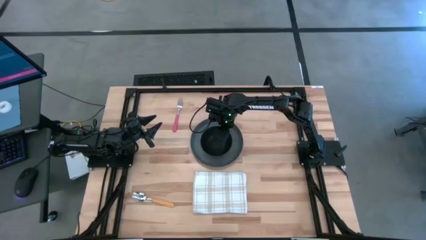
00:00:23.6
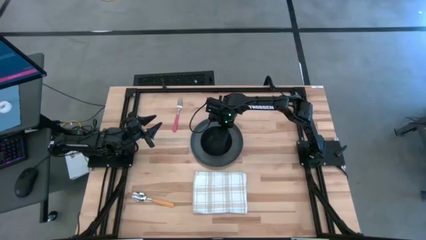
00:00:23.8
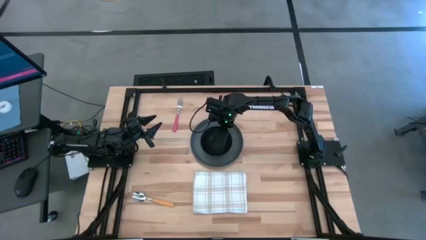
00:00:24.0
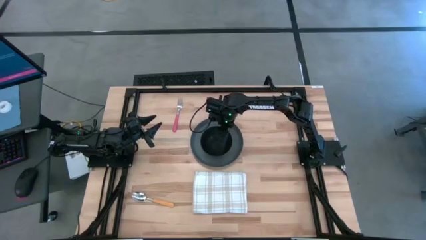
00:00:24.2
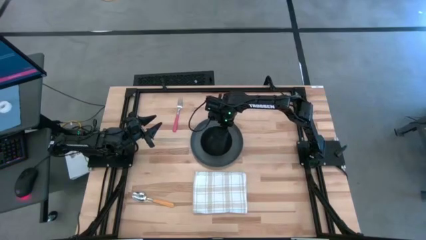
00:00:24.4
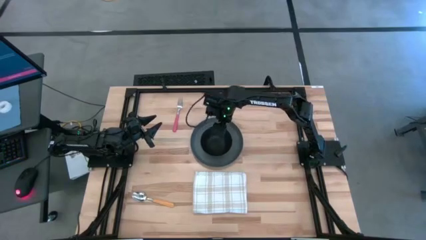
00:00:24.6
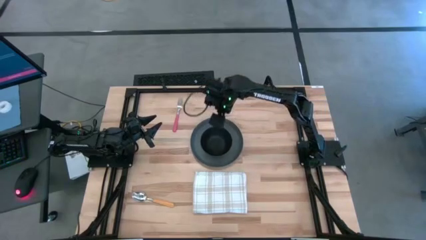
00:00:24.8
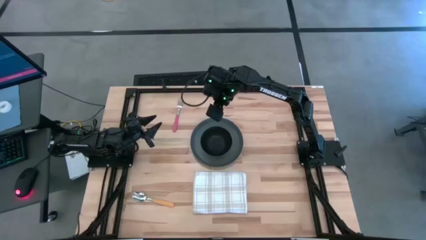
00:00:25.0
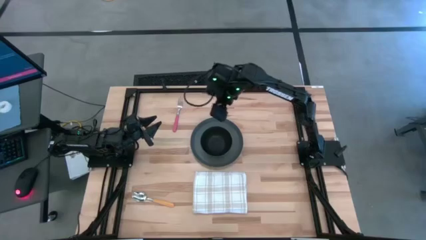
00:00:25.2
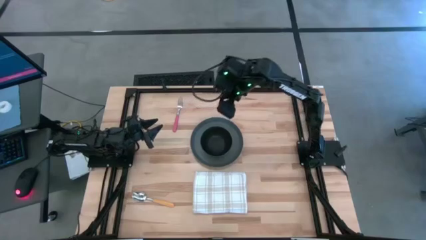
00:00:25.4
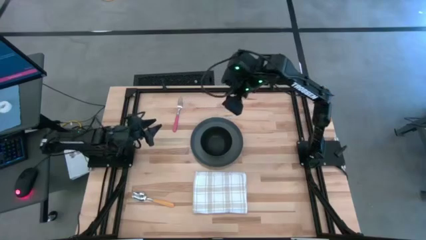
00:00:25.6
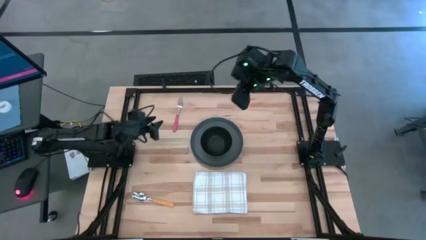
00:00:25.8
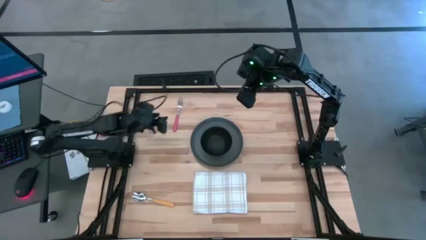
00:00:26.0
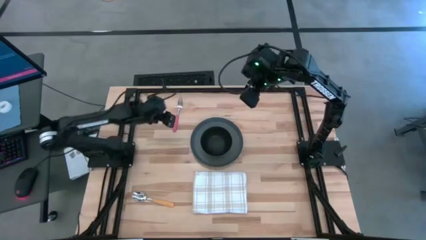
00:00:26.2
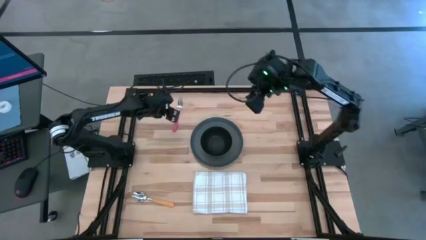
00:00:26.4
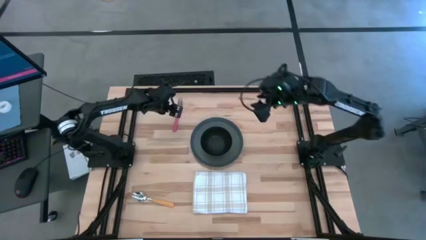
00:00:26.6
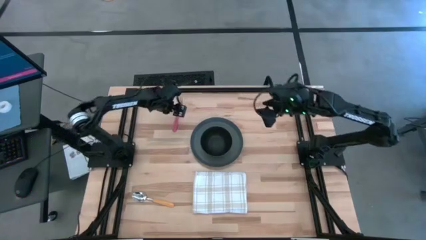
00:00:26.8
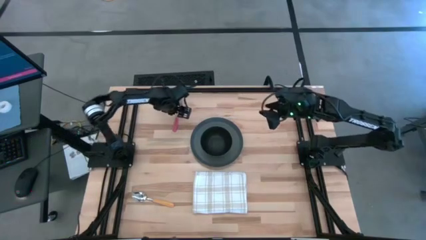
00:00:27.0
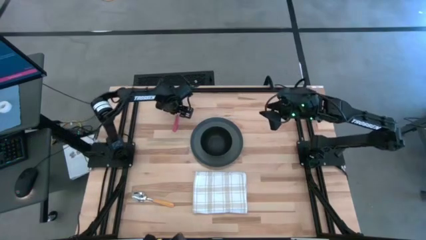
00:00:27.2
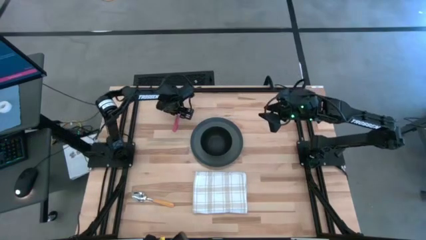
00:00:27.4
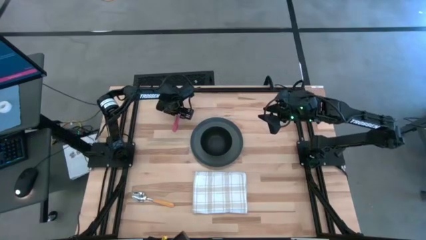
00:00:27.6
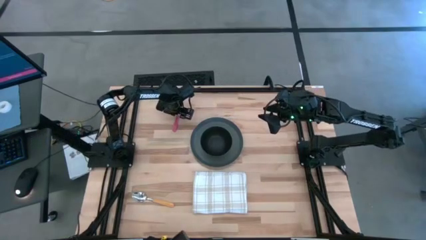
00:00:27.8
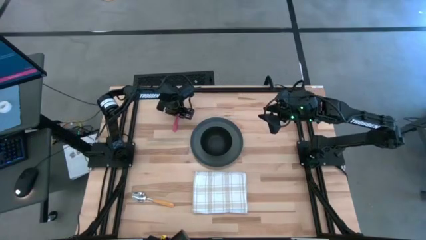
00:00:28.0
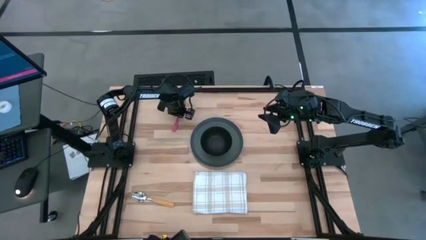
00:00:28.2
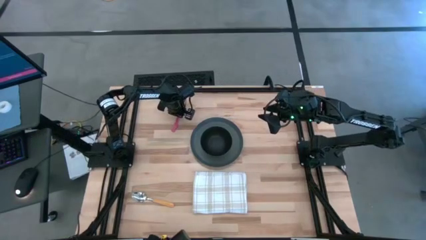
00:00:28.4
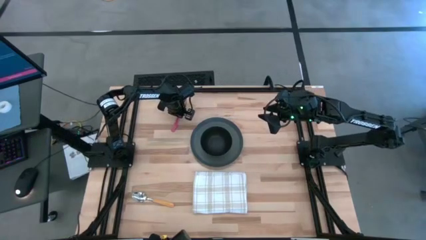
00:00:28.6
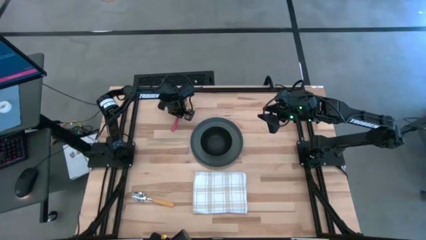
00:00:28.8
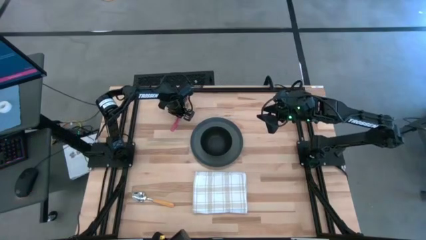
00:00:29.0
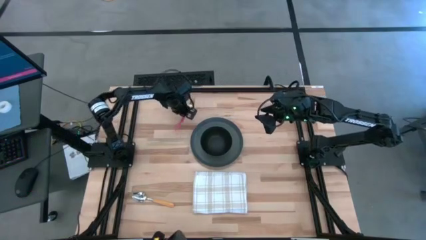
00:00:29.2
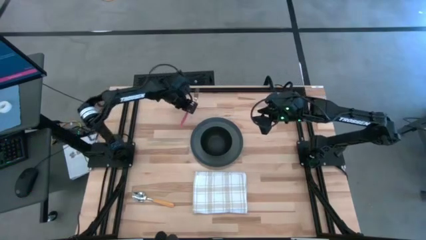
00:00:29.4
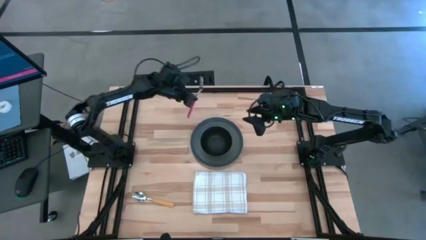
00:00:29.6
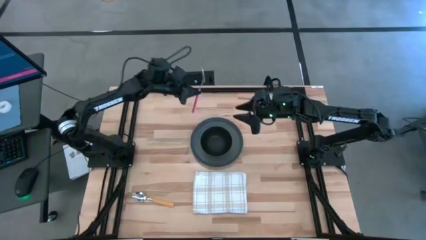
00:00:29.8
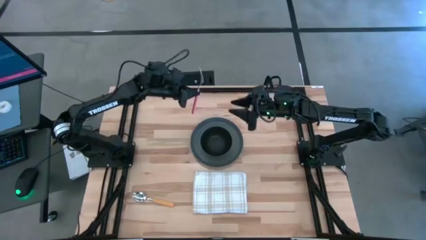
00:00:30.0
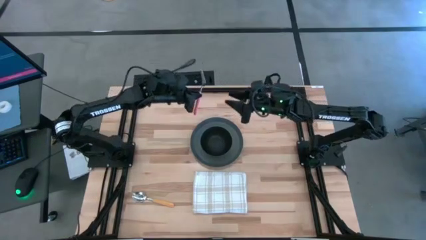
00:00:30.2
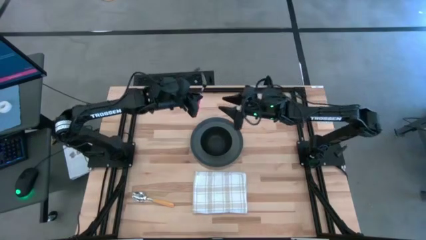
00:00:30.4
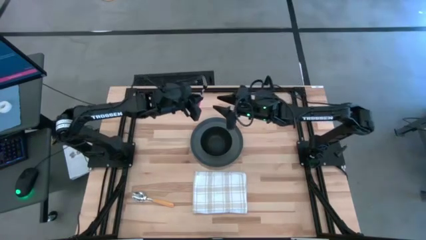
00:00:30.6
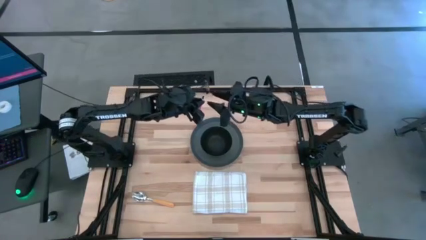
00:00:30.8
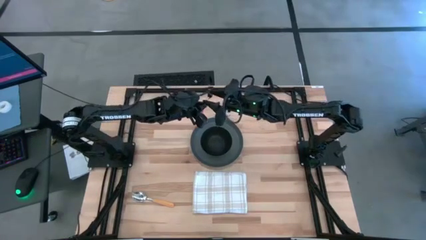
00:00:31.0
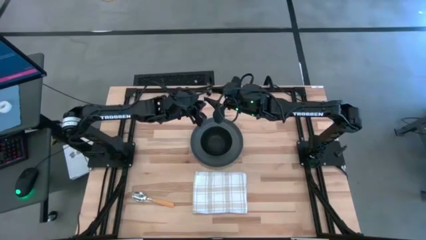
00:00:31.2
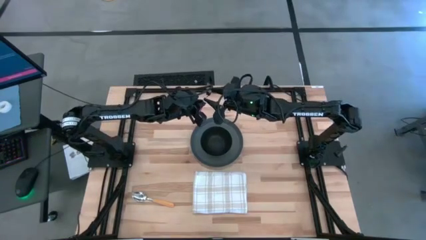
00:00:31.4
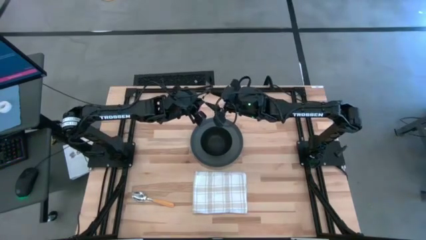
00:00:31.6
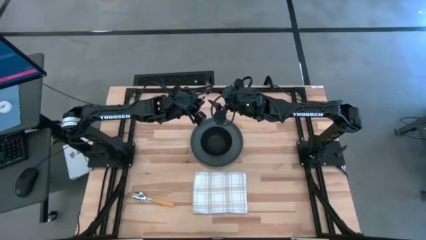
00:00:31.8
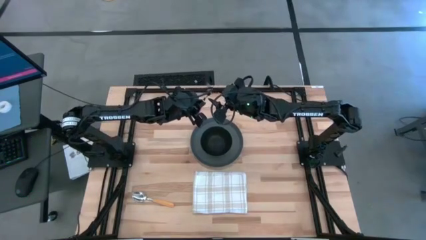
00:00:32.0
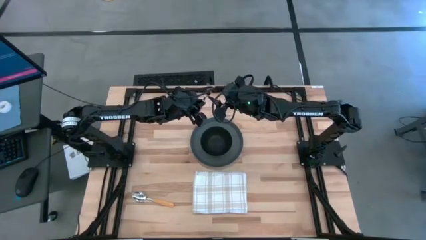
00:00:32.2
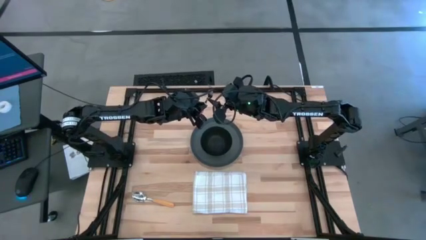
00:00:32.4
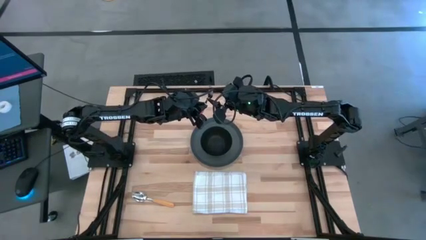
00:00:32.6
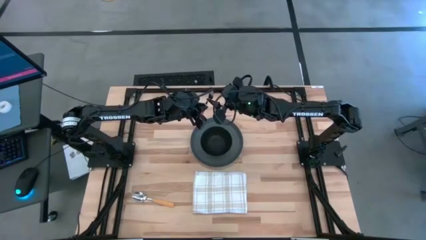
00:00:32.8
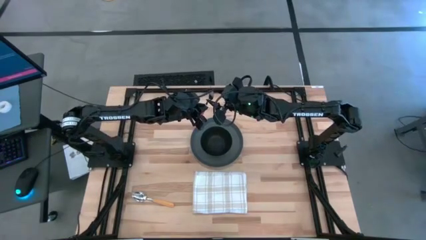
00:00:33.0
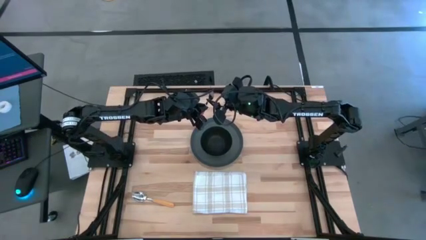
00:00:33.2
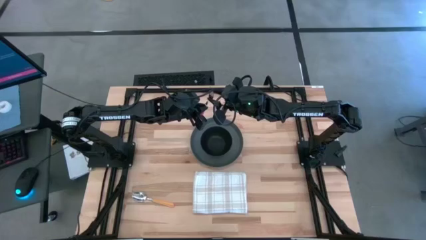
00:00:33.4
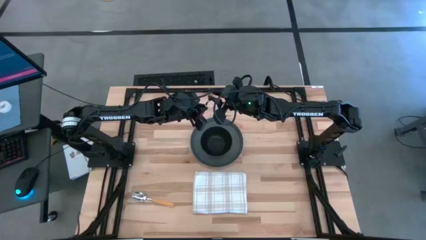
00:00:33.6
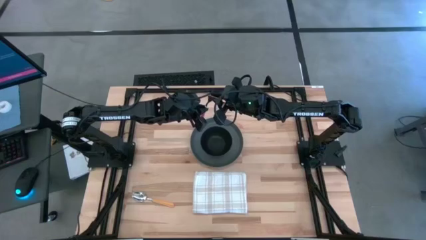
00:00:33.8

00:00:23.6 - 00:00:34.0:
Task: Set table place
Move the red fork to the right of the black plate

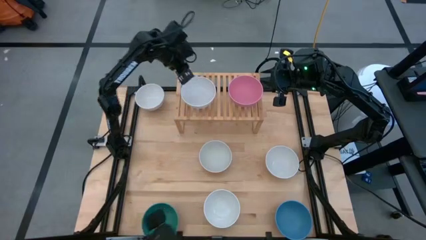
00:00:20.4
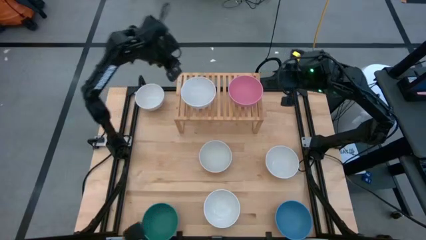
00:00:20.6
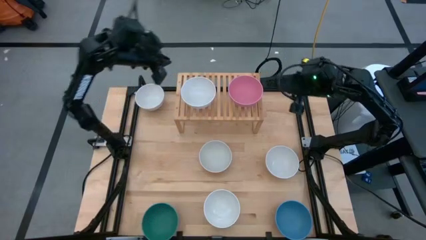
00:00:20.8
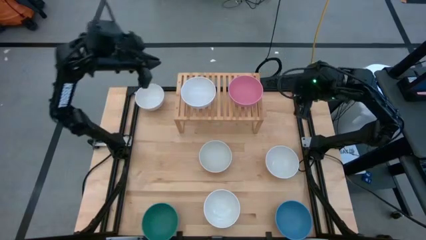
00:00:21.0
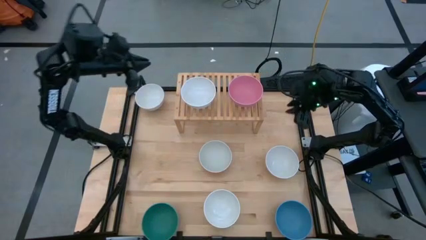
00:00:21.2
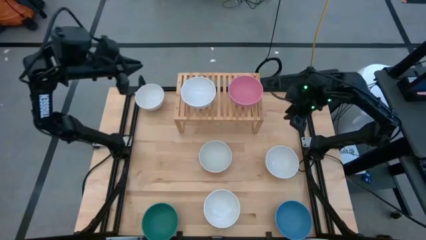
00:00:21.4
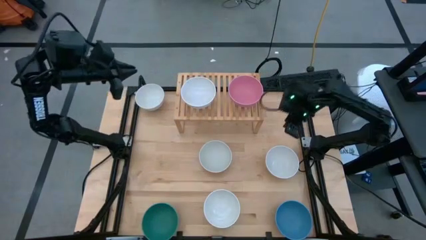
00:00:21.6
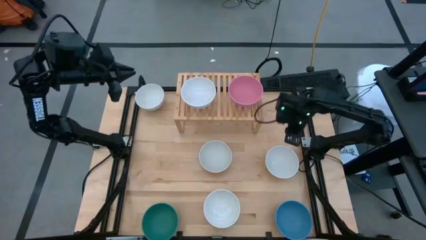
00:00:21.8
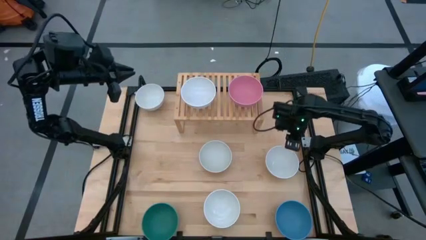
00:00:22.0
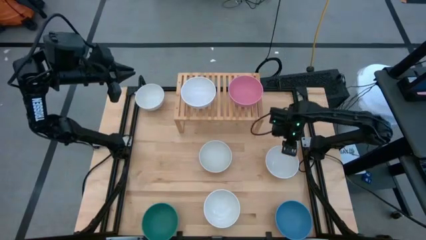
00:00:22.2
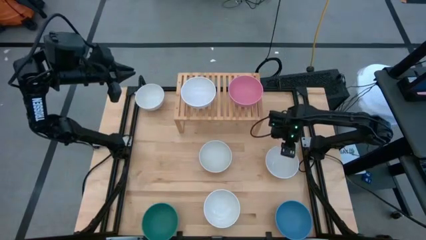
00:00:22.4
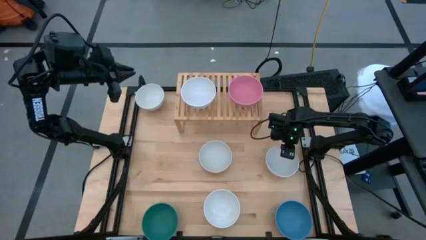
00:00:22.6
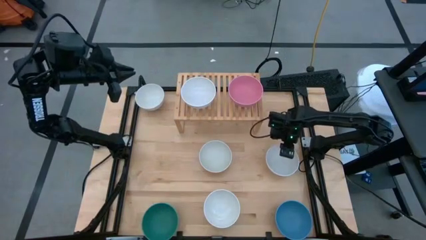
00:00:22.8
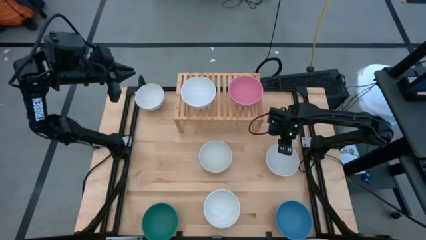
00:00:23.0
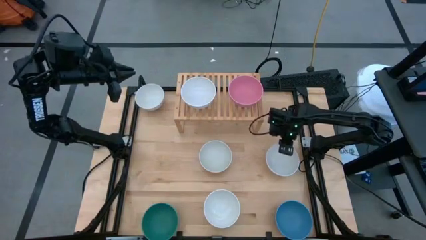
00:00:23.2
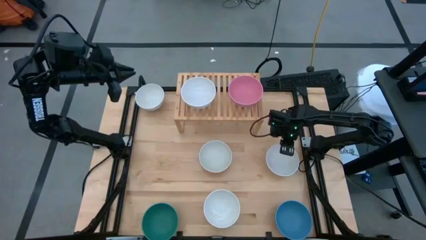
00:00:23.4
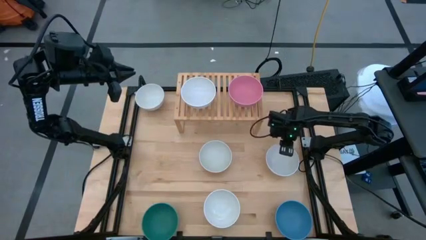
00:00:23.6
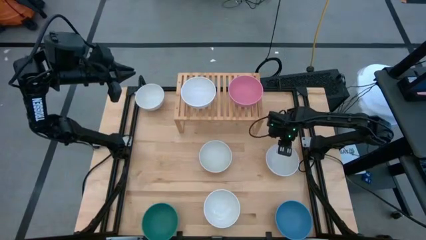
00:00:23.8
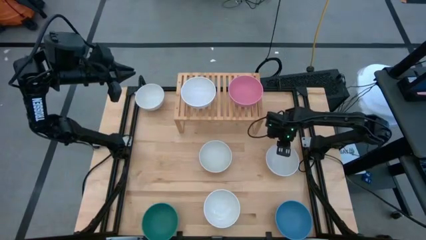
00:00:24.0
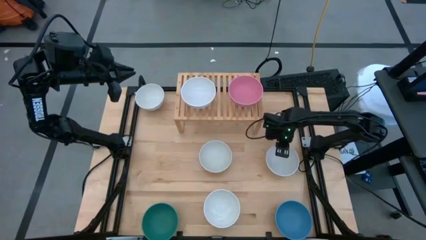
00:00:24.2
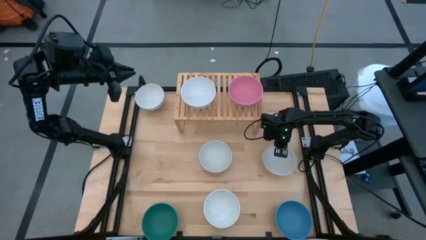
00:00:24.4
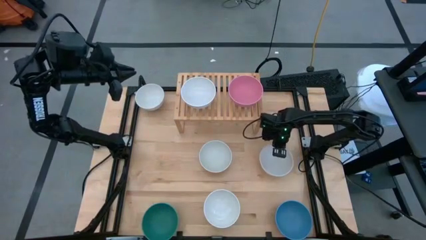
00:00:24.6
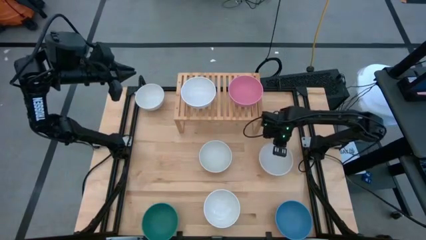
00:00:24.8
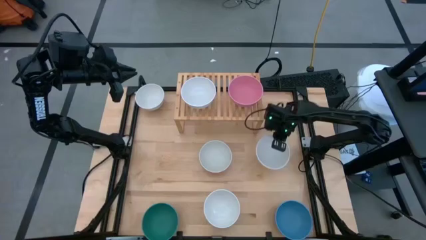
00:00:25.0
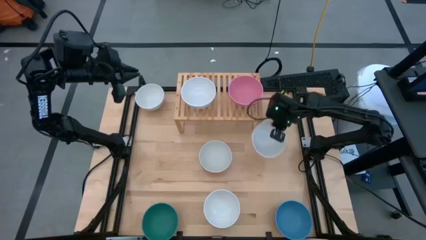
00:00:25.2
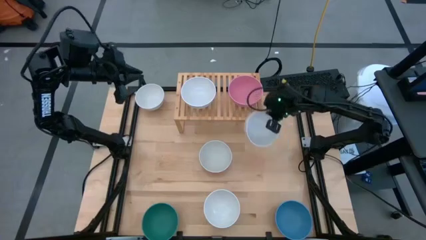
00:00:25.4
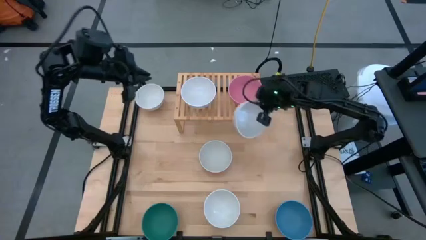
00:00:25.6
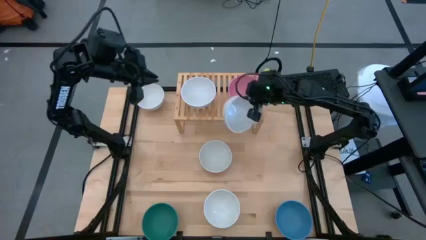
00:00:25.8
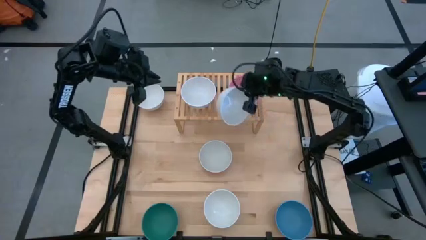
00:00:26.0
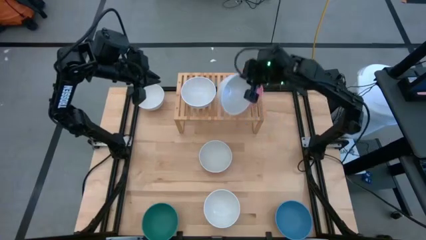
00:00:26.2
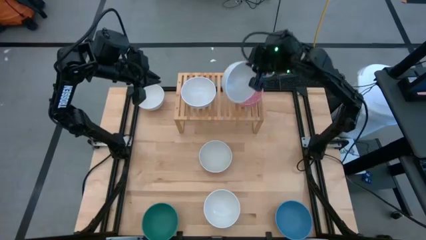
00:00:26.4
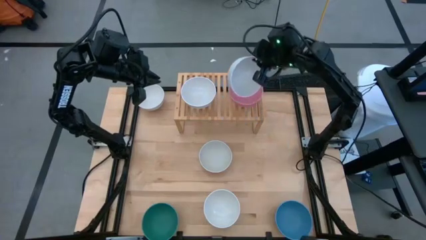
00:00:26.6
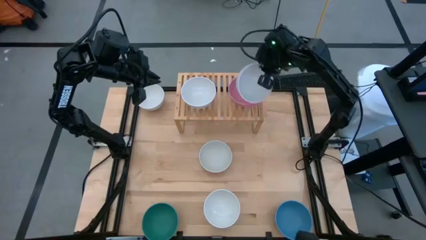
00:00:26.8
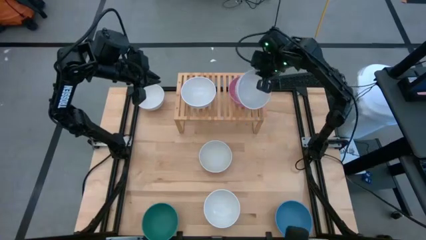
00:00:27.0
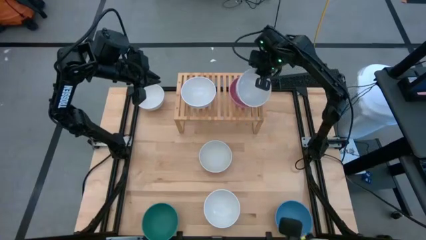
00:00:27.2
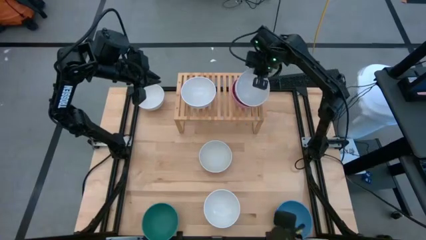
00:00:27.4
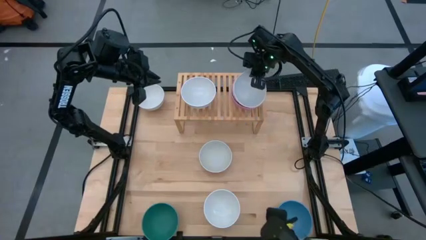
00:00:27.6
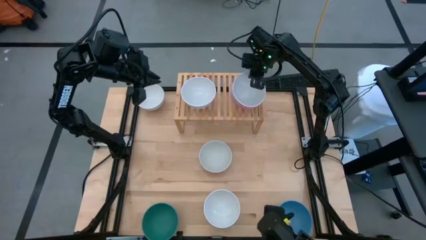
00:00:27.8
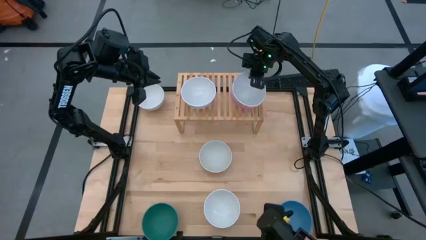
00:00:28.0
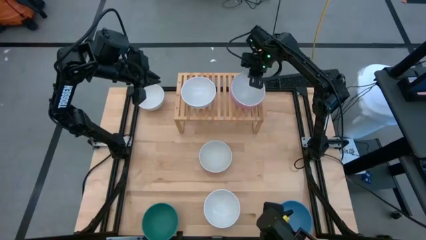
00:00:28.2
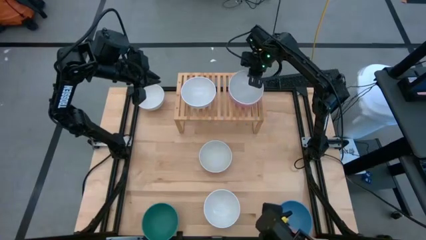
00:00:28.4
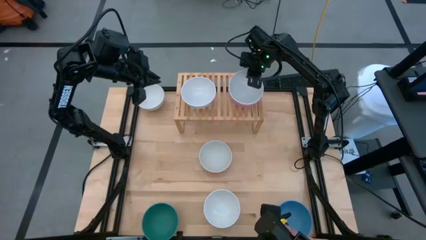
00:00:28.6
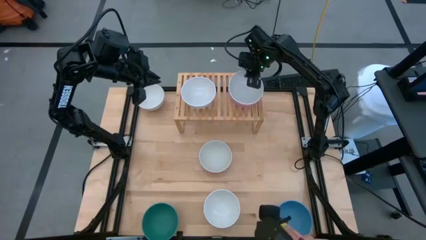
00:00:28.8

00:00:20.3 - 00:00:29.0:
Task: Place and stack bowls onto a shelf
Stack the white bowl on top of the pink bowl on the shelf
